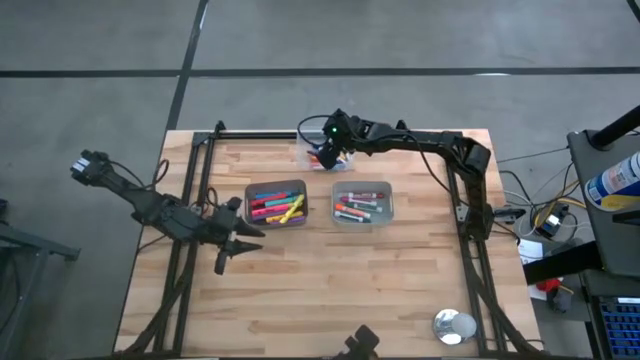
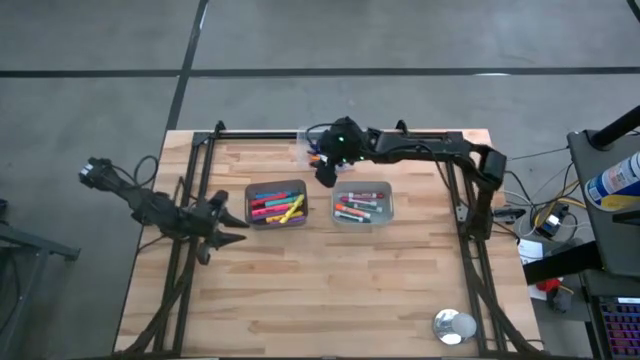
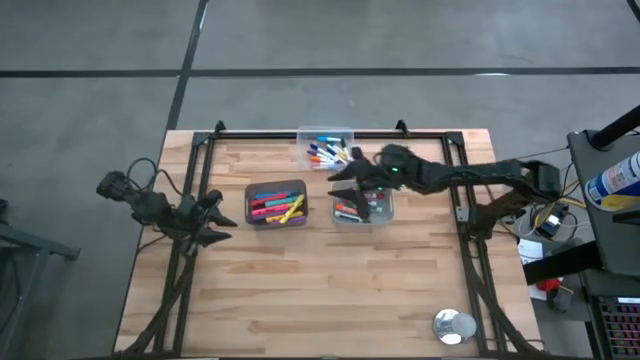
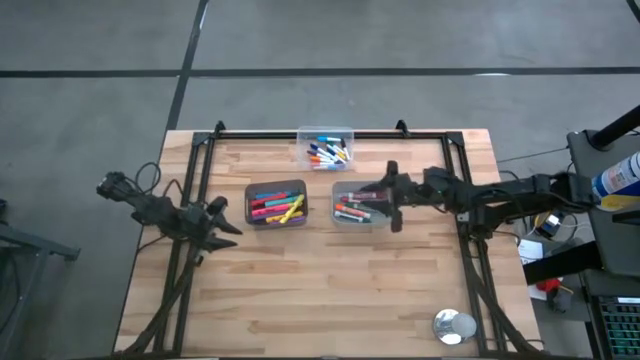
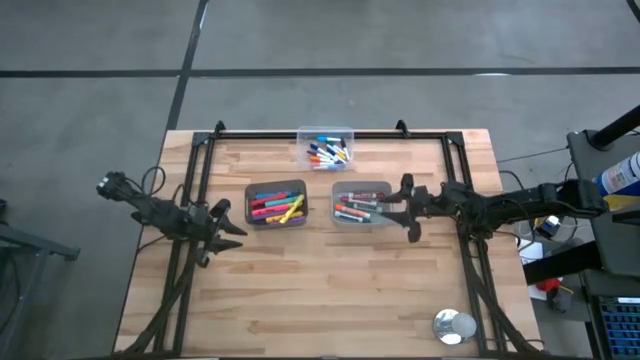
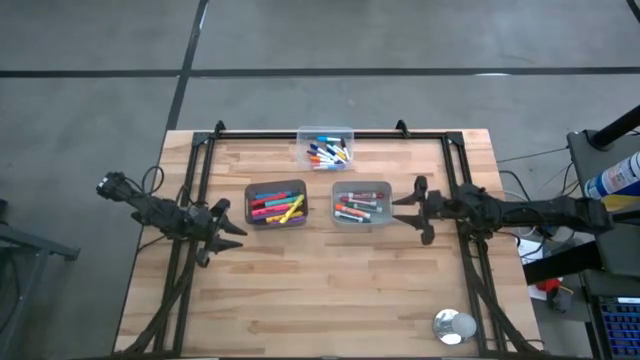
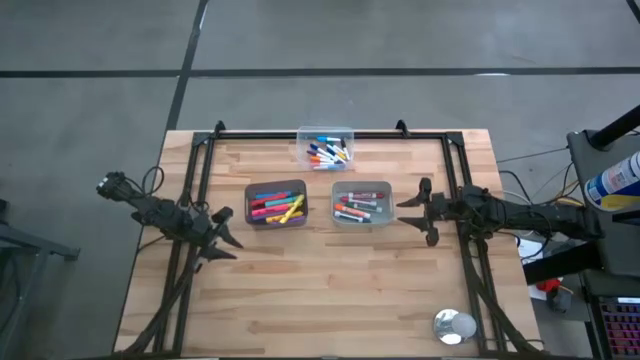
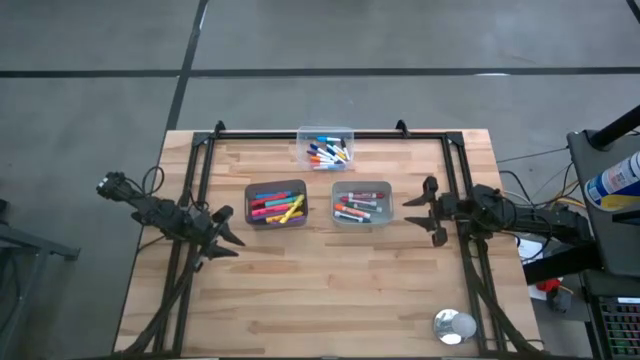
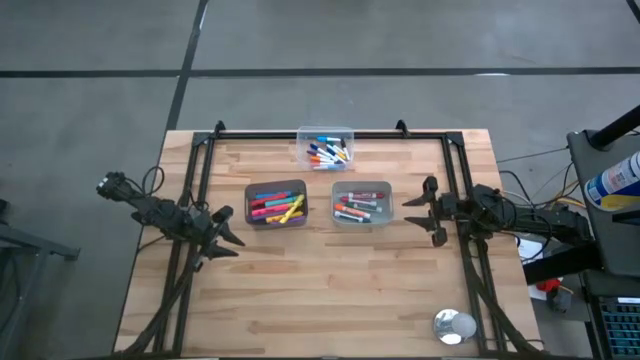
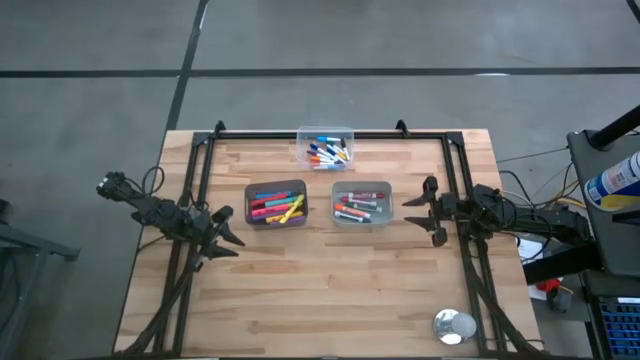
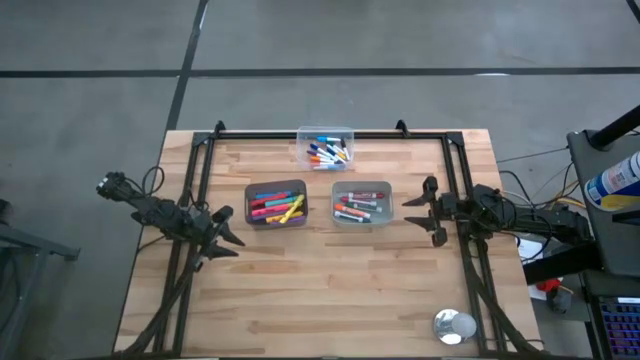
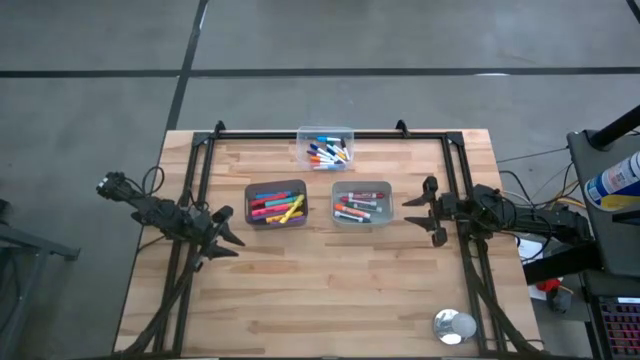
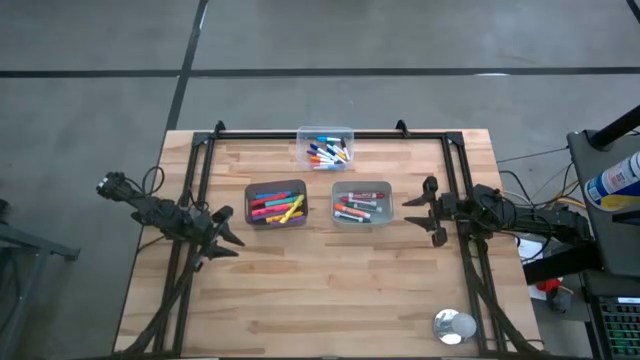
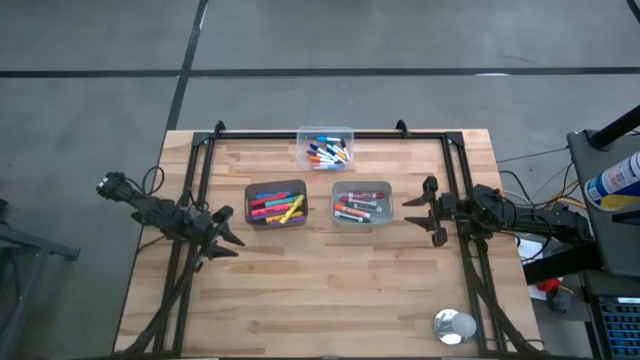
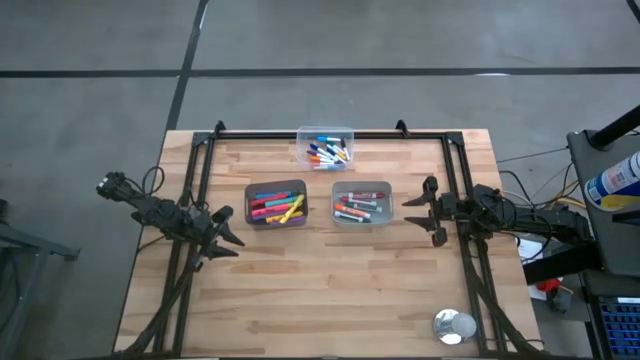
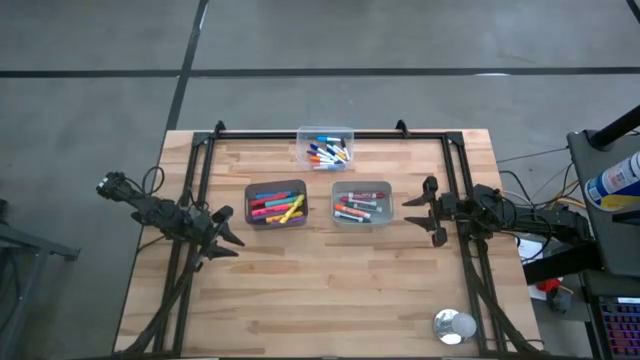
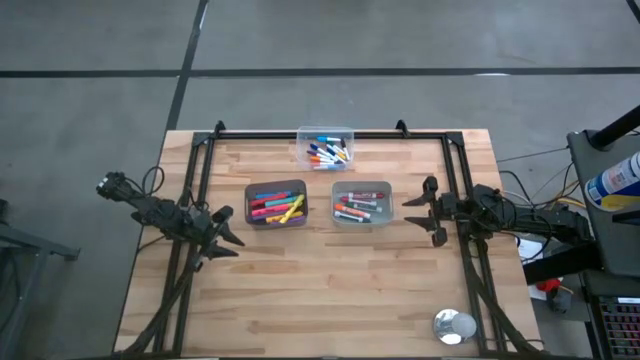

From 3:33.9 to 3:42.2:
Task: Pick & Place Markers
Return to Home Position

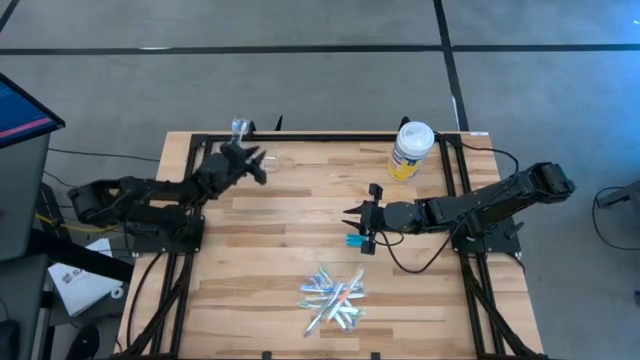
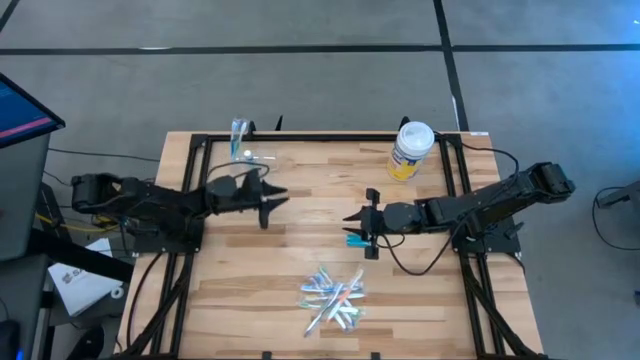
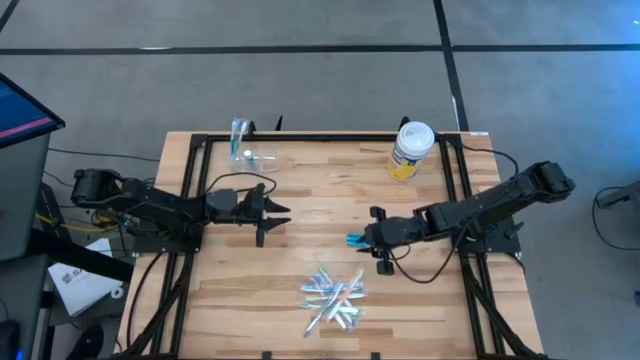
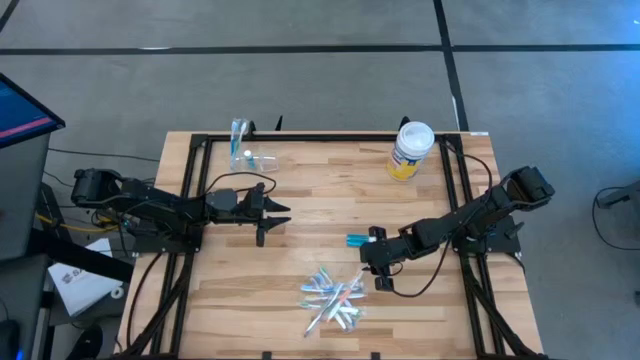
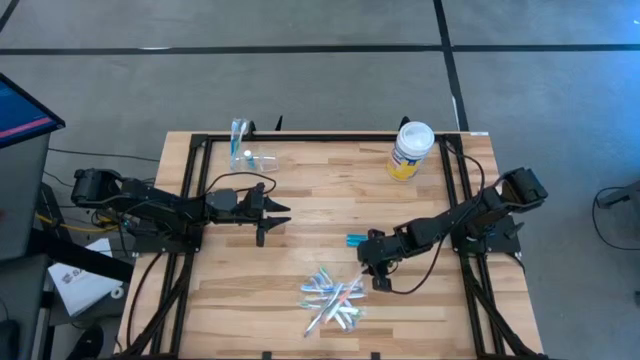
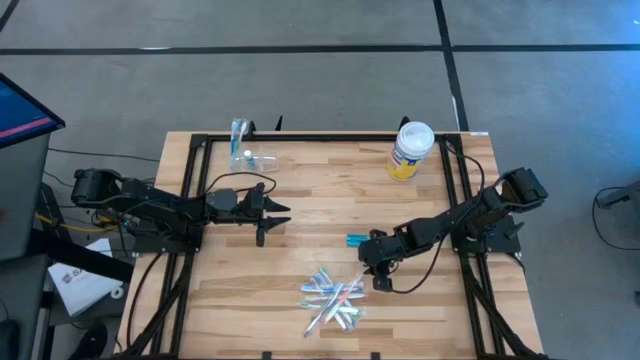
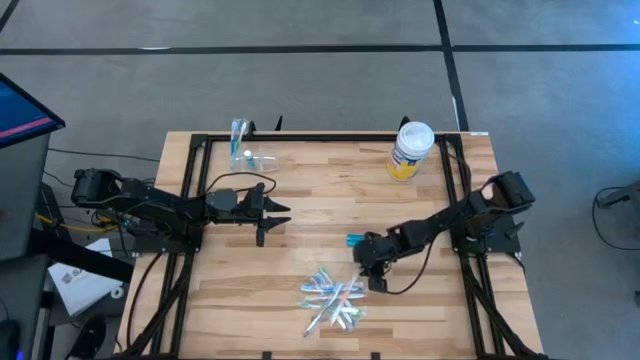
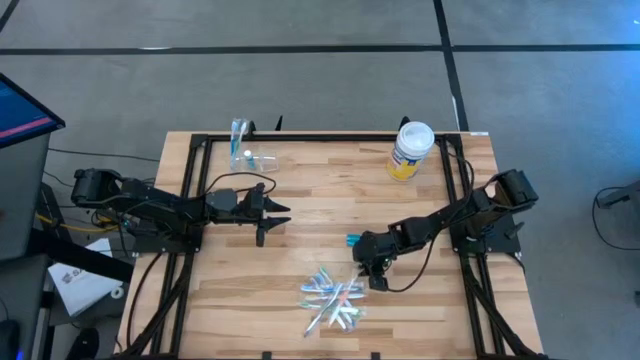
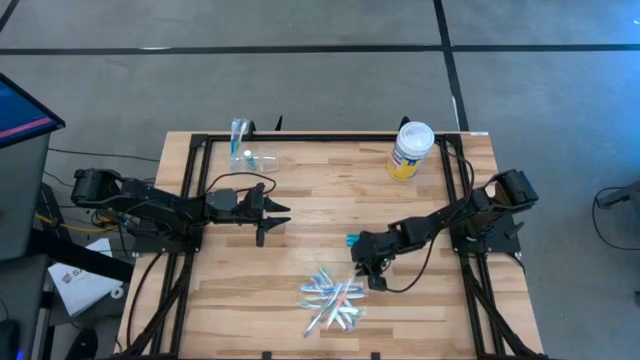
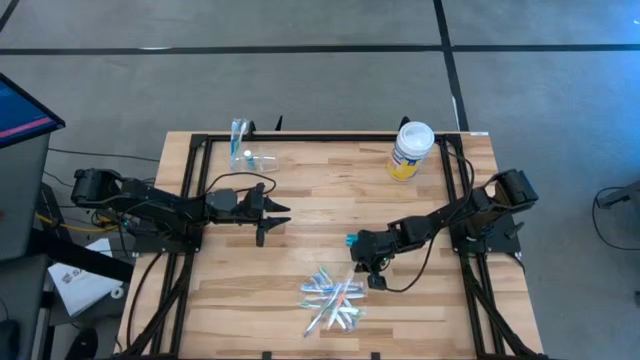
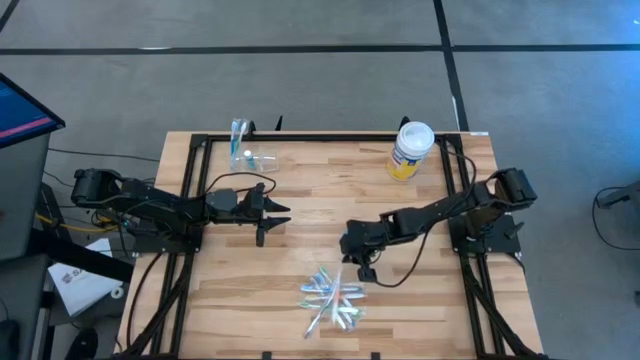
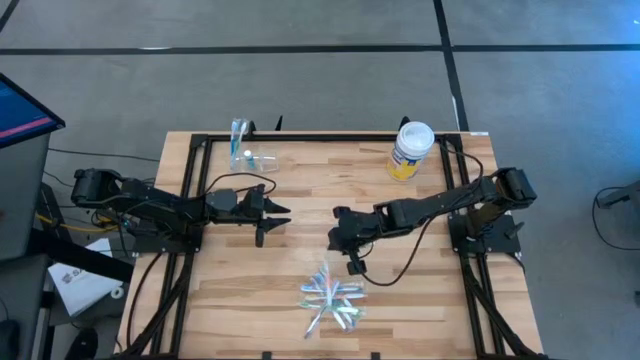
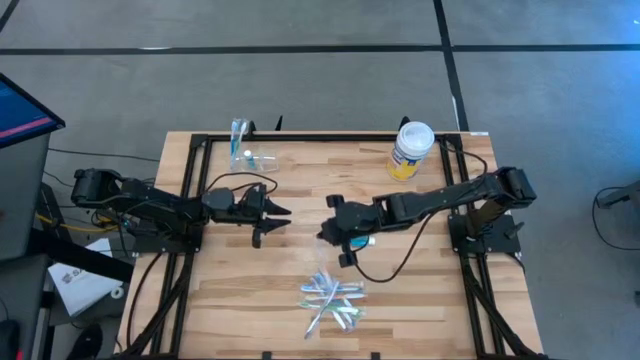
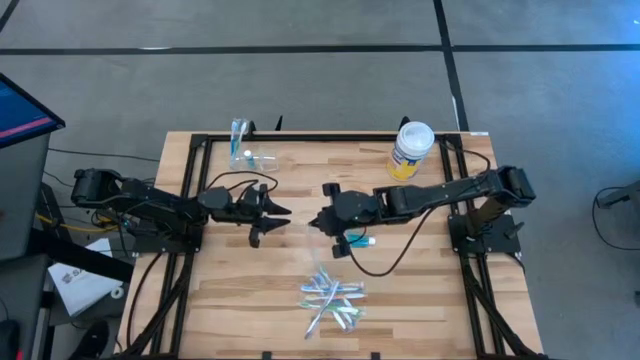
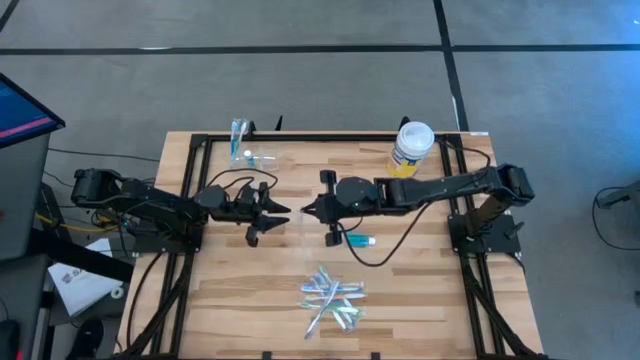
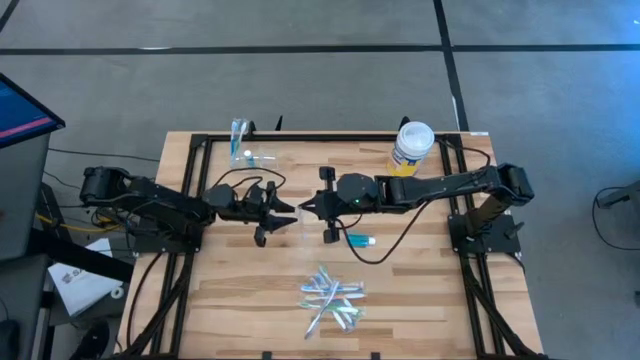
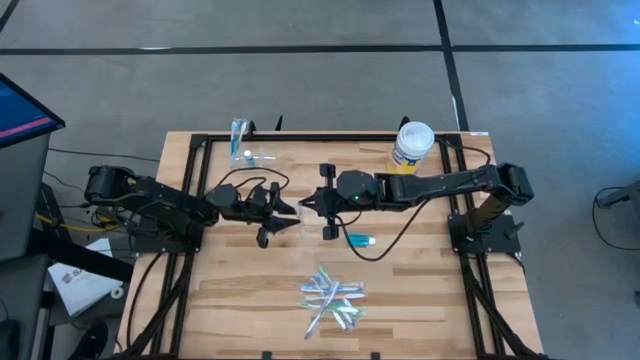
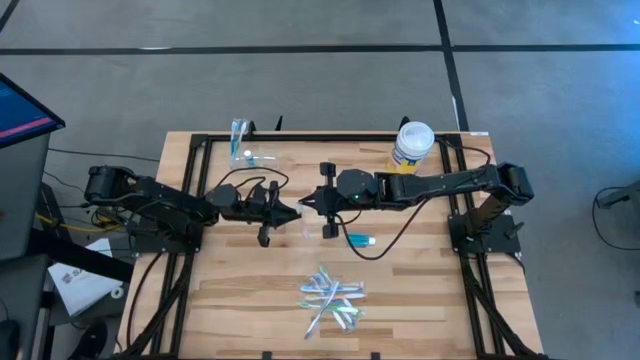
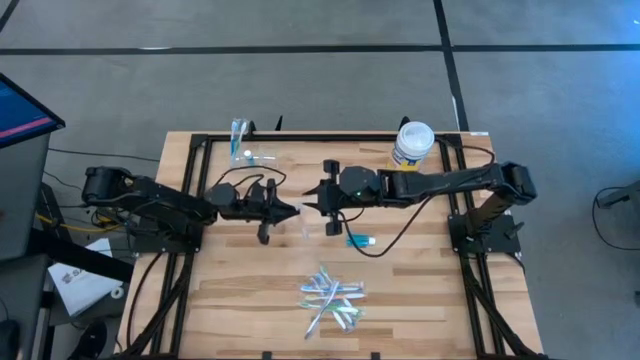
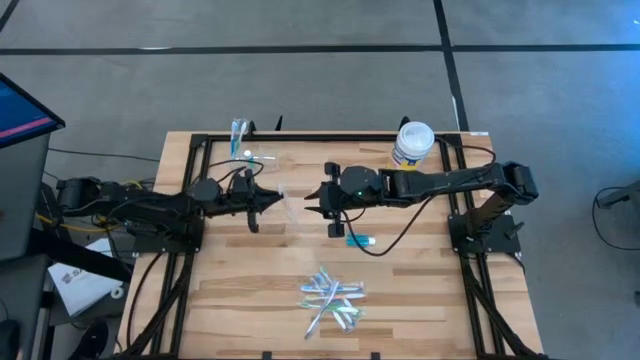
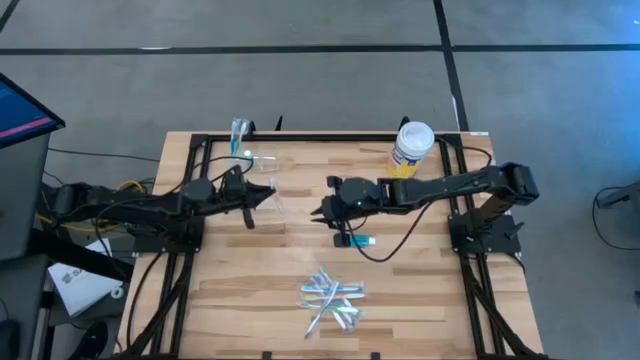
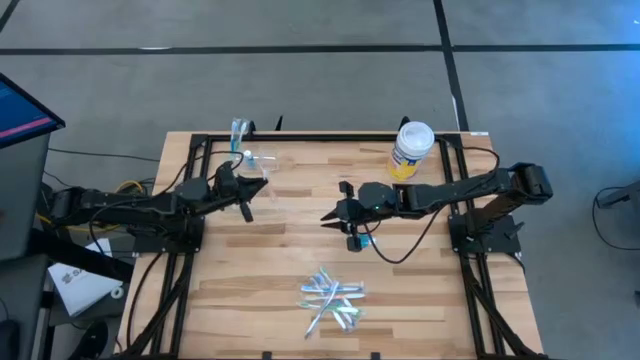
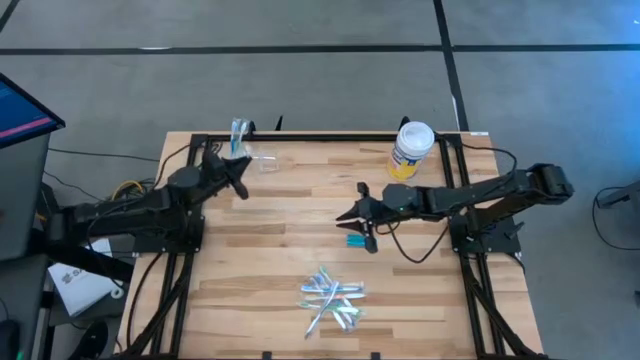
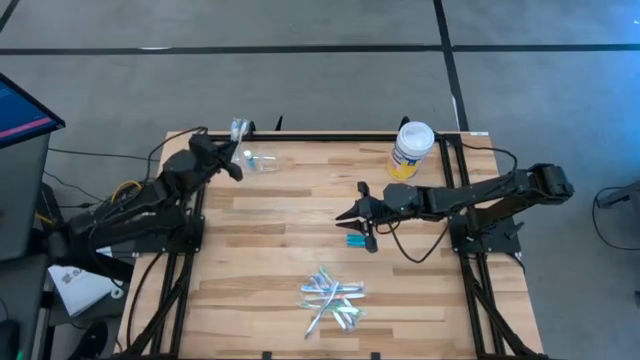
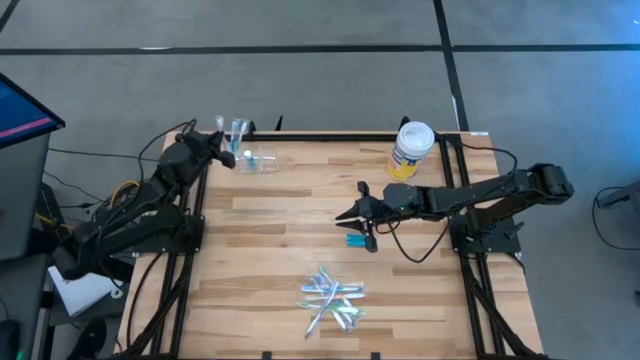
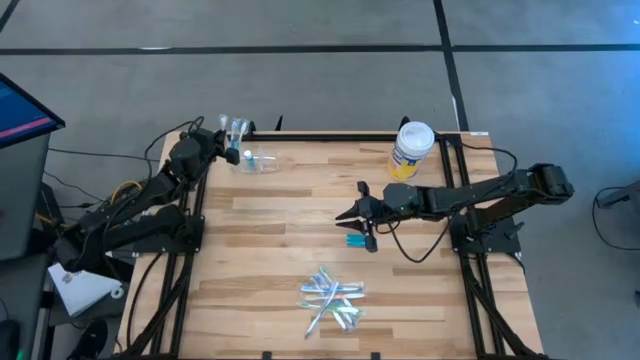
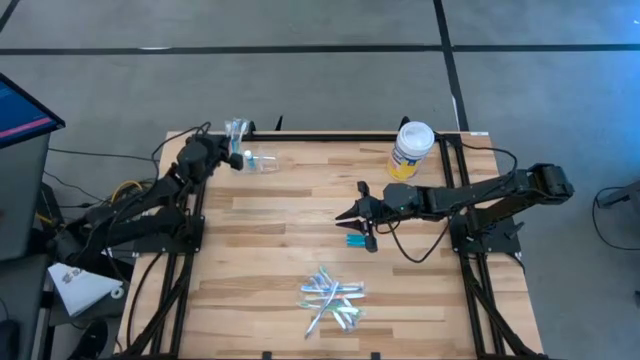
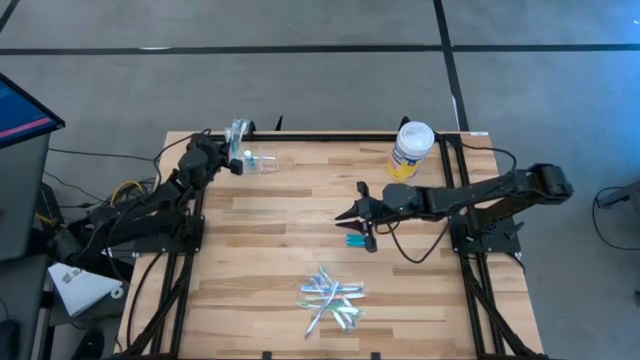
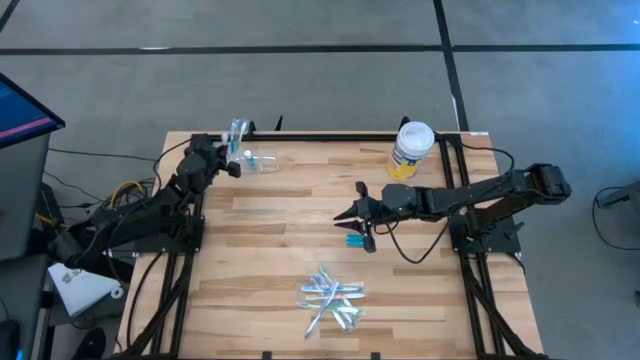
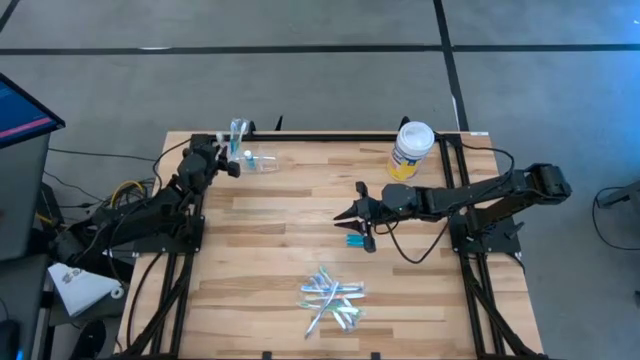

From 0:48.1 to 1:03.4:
Task: Pick & Place toothbrushing station
Put the orange toothbrush into the transparent organizer
